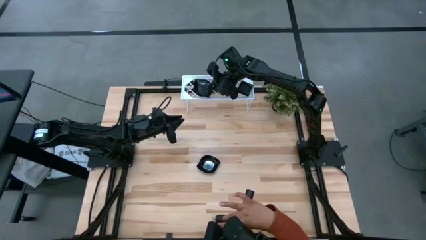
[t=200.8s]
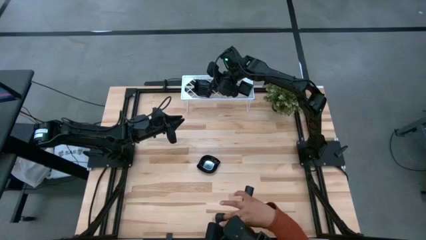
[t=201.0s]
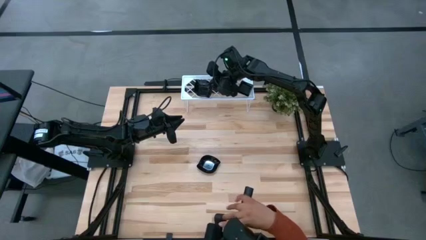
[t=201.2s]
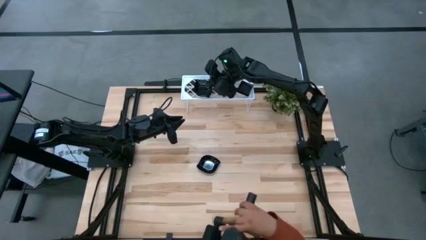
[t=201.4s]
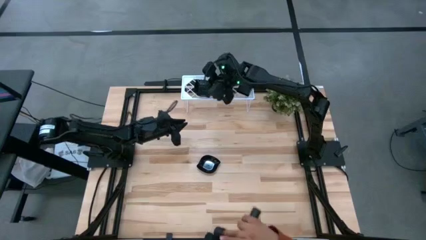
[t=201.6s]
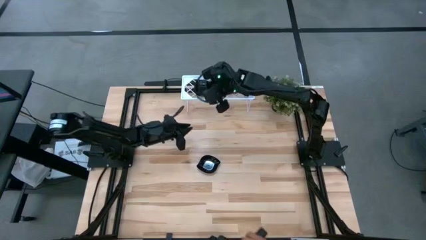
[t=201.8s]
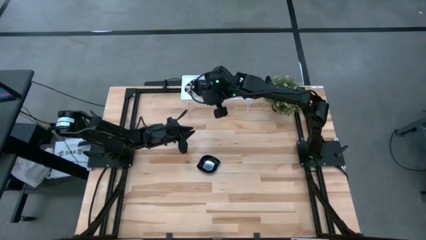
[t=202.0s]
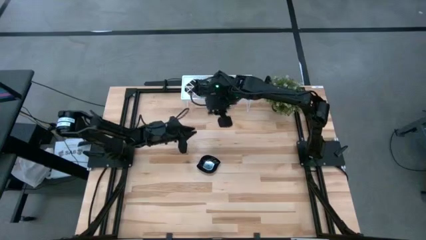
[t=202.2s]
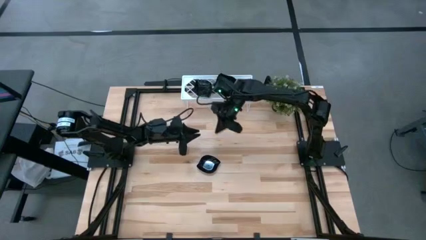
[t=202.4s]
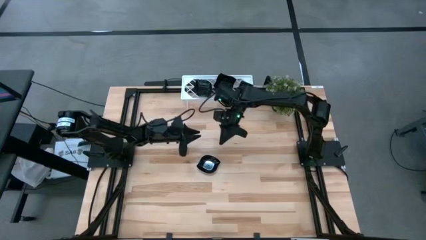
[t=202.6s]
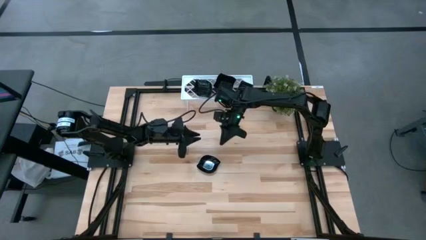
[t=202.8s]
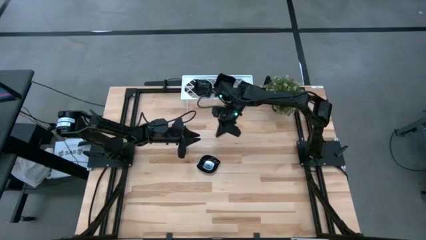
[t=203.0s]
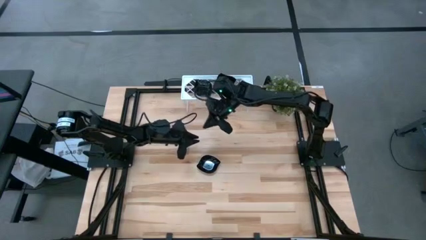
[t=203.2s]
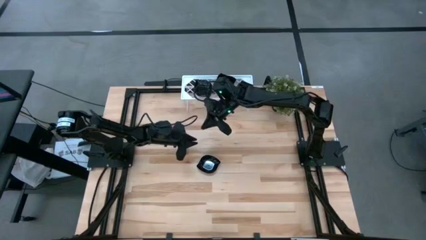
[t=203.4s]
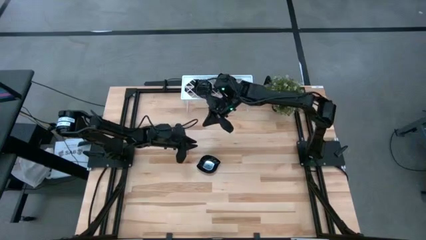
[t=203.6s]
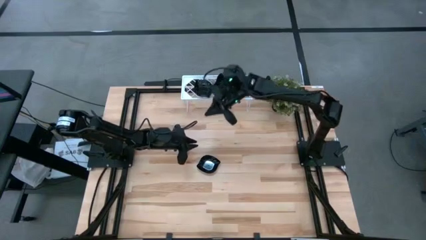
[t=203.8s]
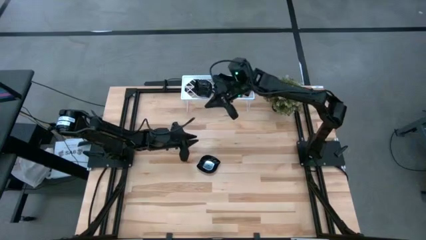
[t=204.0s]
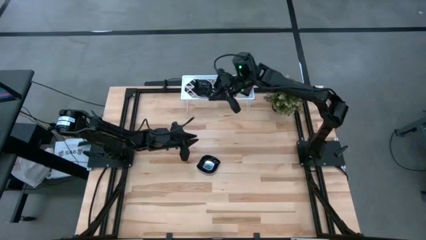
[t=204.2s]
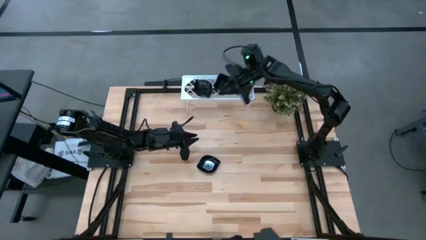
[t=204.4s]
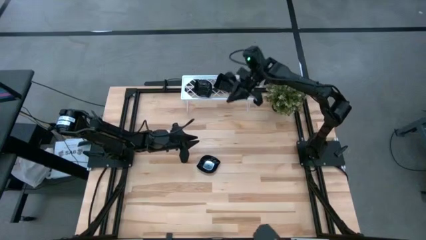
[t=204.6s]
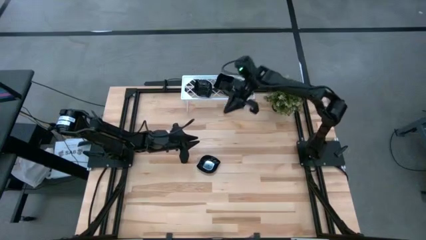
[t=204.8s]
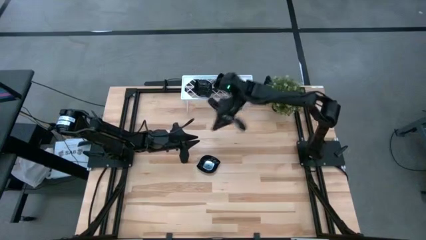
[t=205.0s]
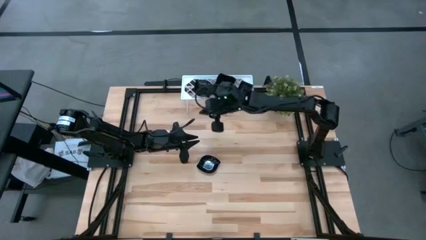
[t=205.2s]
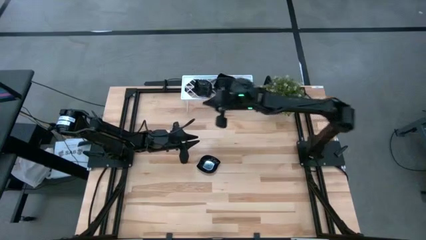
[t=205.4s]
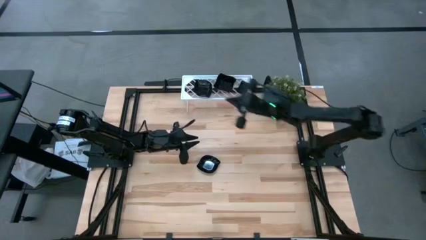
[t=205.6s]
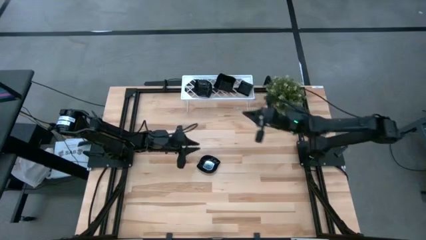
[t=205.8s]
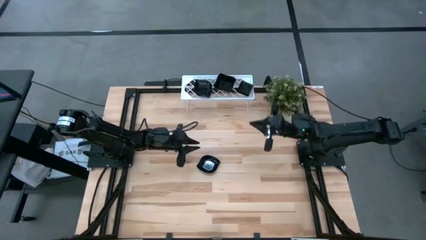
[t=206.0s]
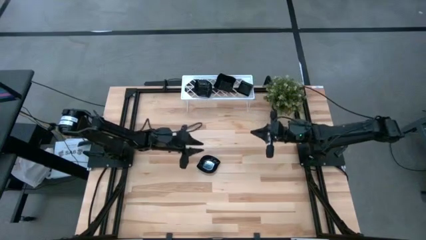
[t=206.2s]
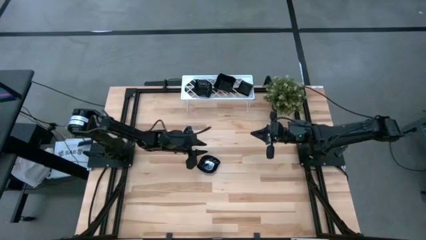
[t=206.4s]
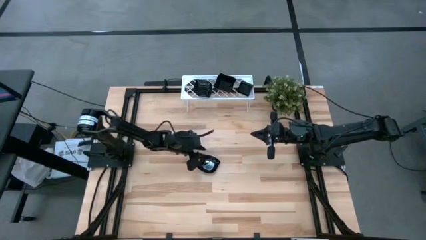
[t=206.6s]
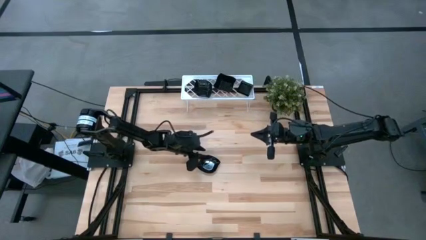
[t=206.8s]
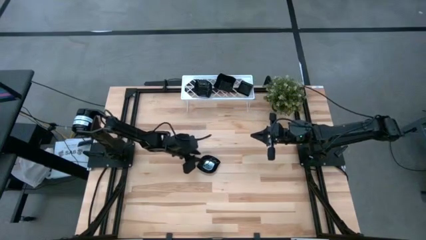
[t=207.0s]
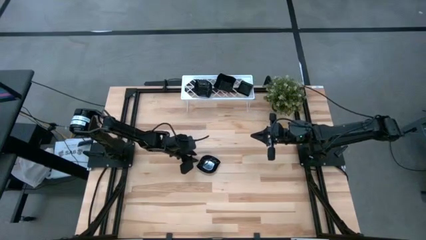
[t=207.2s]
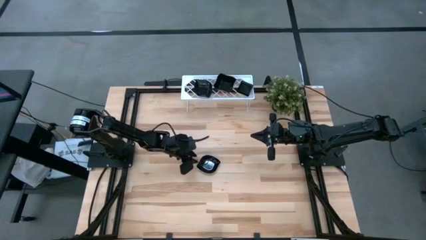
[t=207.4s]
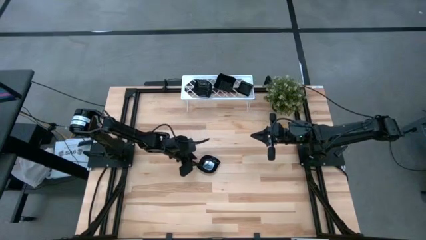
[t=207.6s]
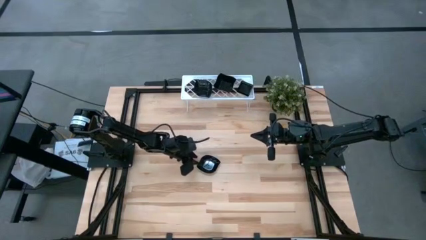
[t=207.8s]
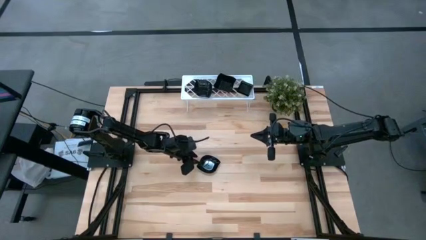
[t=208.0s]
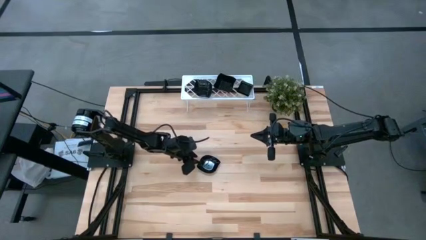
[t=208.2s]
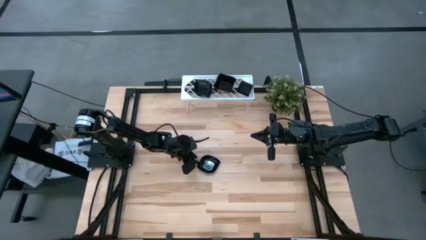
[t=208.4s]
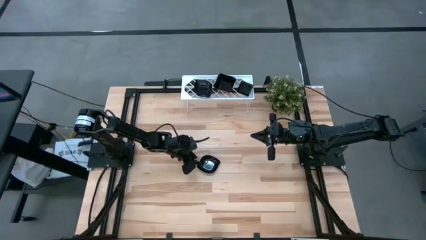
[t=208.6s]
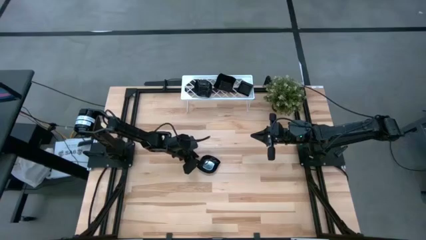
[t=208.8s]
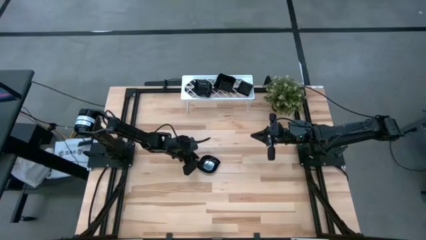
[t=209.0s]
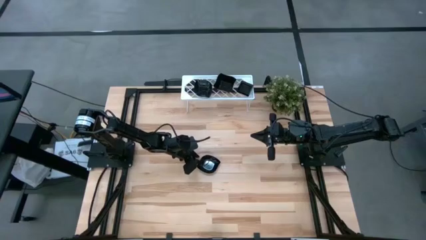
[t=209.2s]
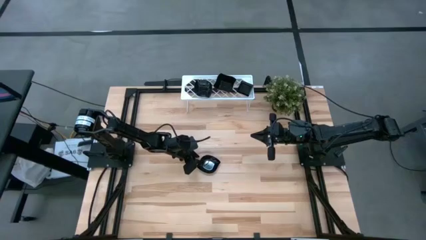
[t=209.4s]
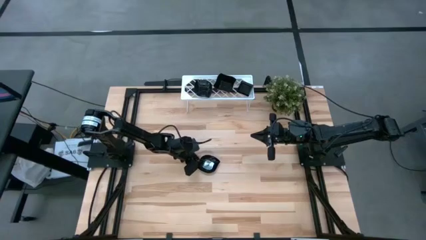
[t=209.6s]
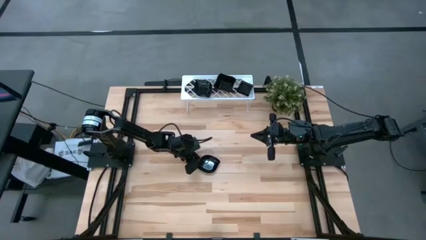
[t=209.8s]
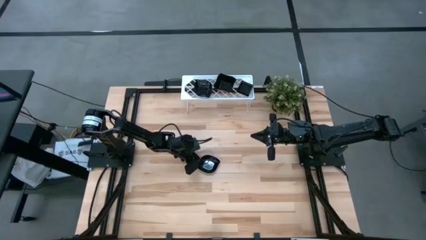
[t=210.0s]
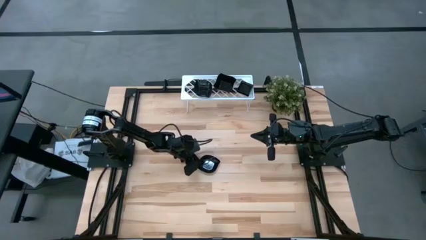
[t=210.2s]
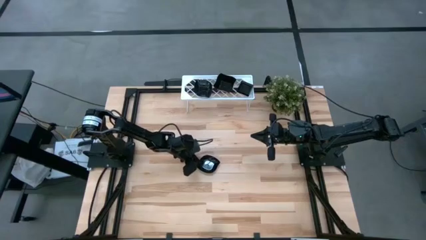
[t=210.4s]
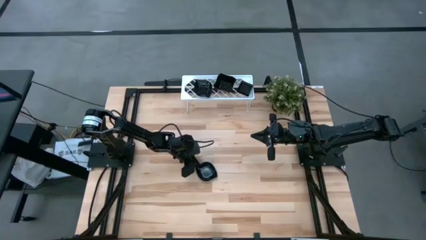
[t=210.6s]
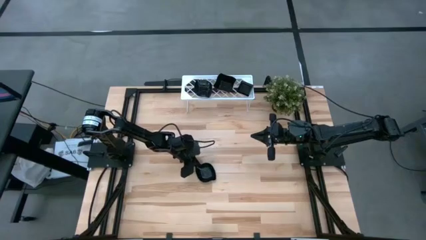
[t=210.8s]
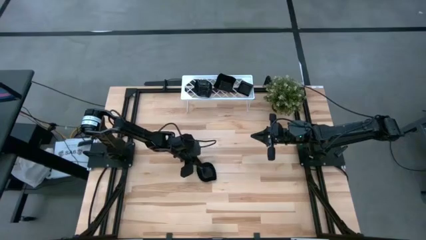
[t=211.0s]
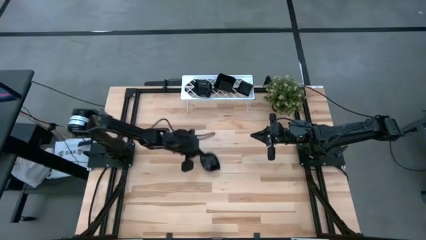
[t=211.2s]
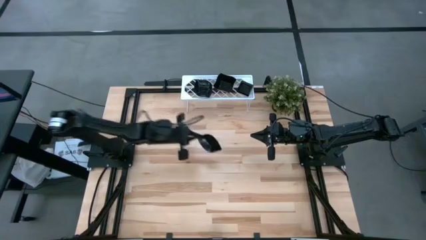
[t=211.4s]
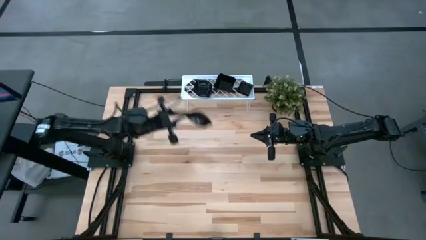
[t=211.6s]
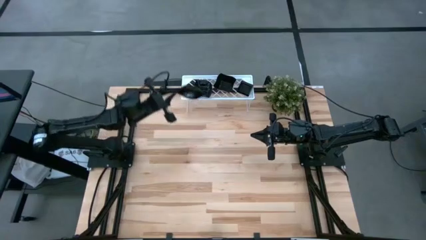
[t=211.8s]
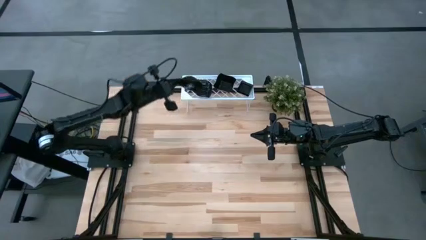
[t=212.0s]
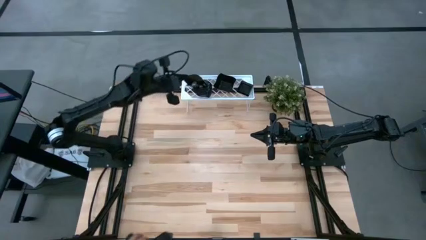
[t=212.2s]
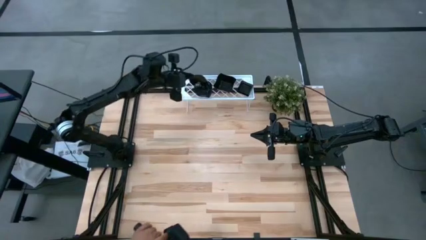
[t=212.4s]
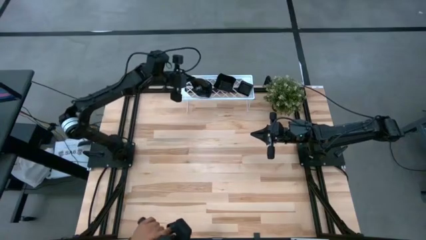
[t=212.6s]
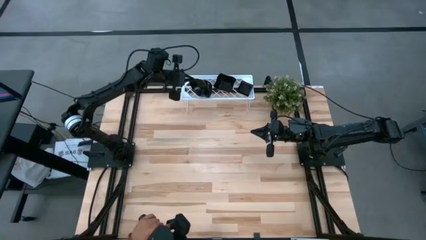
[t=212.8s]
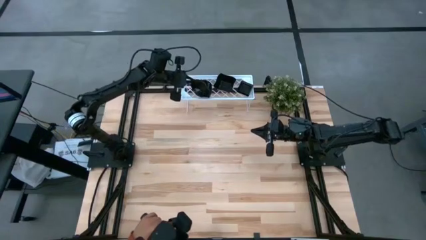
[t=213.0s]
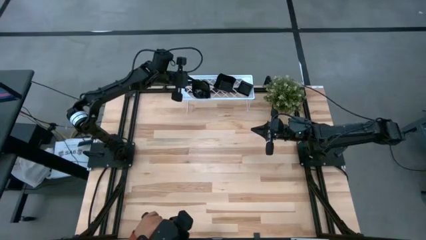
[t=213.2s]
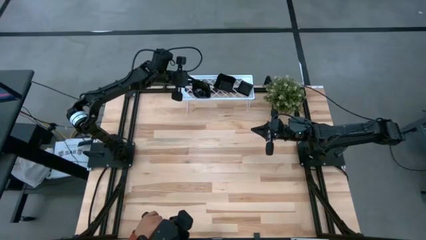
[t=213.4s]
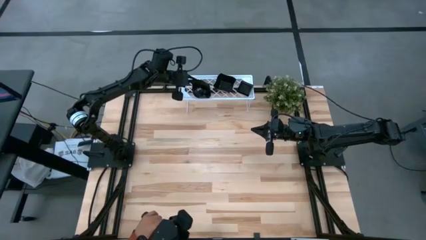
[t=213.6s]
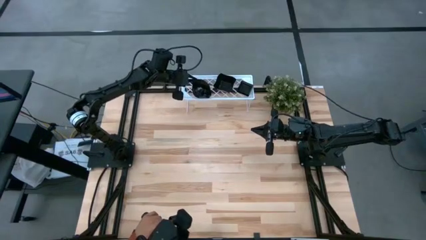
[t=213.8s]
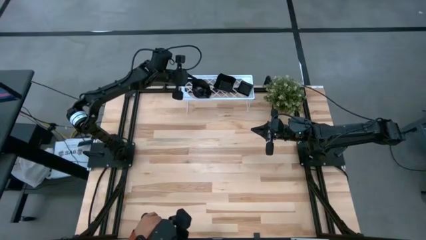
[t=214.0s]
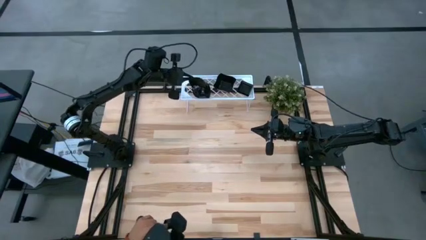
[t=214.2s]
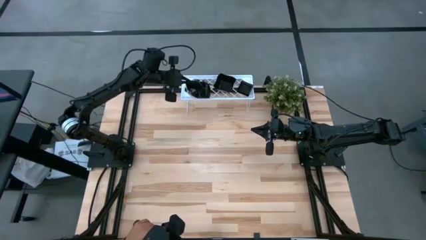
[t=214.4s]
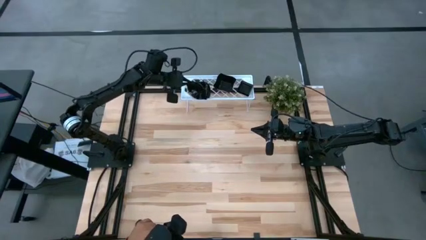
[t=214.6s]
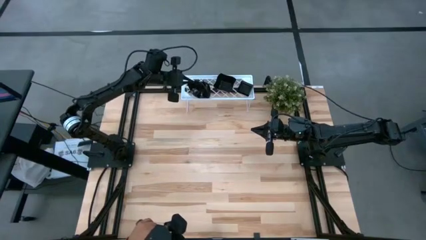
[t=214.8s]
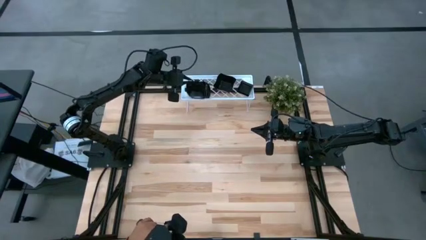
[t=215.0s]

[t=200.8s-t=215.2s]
Task: Pick & Place Mini shaped plates
Stack the black leaf-shaped plate on top of the black leaf-shaped plate on the shelf

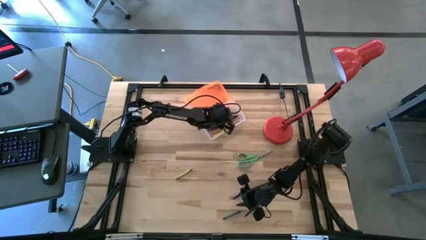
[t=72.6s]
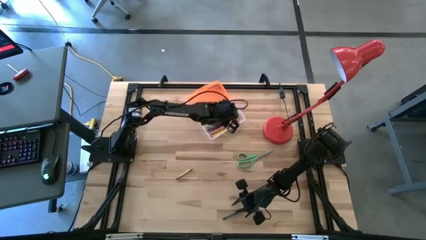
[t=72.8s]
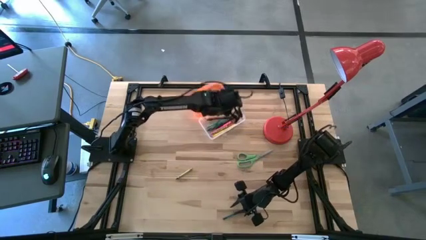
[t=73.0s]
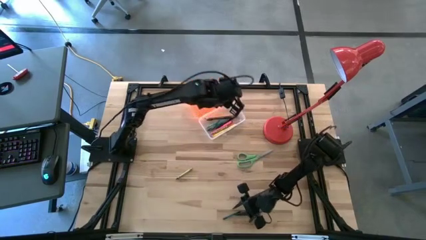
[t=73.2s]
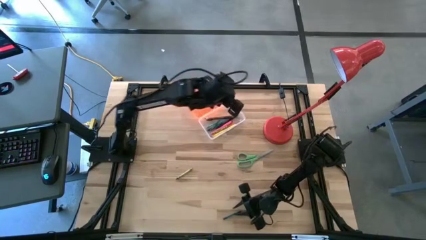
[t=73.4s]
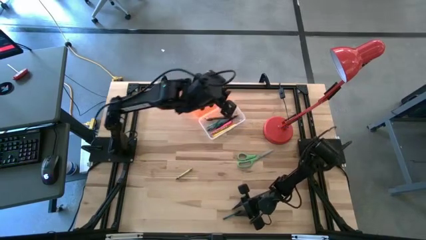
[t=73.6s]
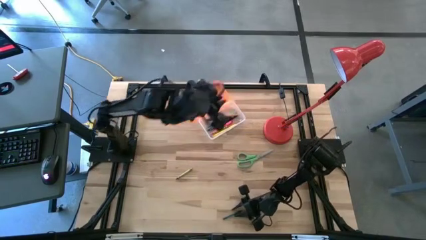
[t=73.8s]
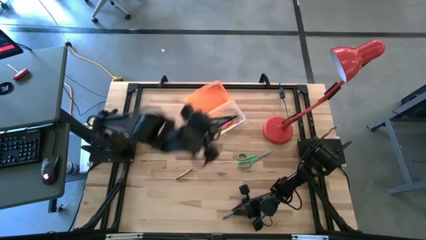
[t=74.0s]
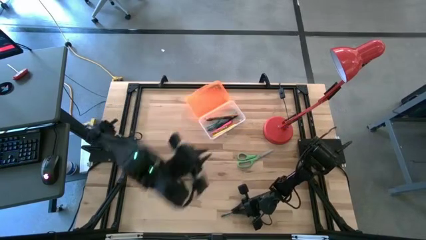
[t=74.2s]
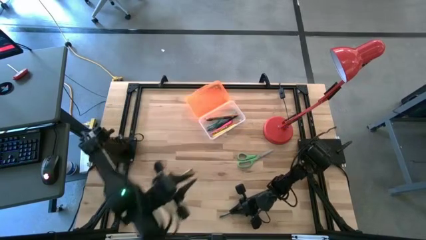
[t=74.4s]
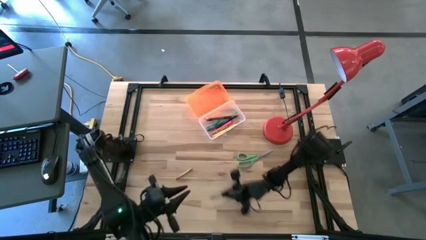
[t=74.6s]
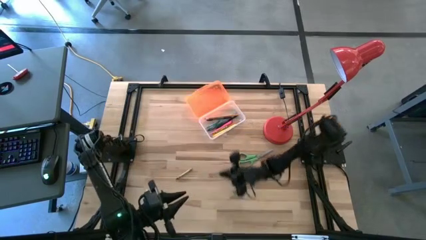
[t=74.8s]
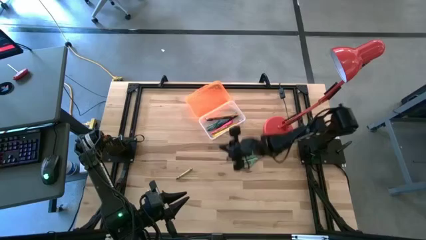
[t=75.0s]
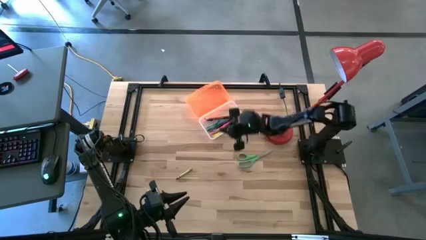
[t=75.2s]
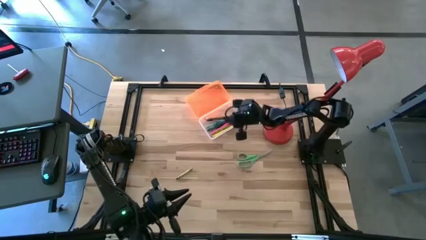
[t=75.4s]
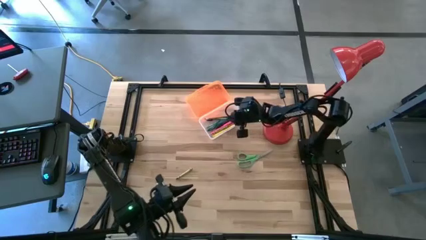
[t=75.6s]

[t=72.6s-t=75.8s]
Task: Pick & place school supplies into a supply box
Put the dark green crayon into the orange supply box
